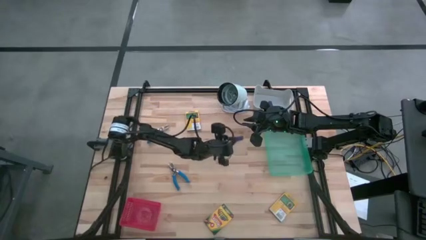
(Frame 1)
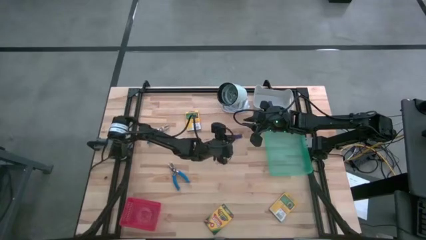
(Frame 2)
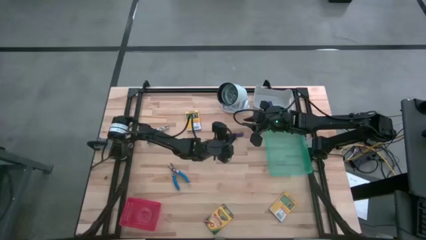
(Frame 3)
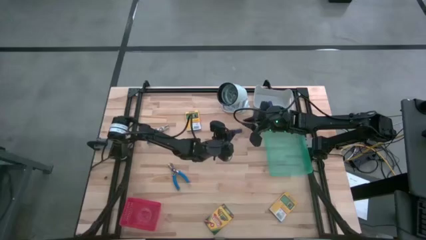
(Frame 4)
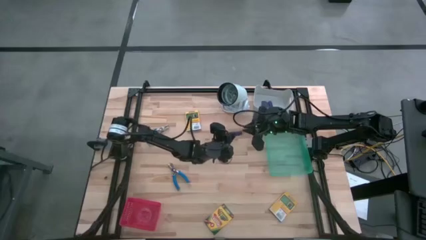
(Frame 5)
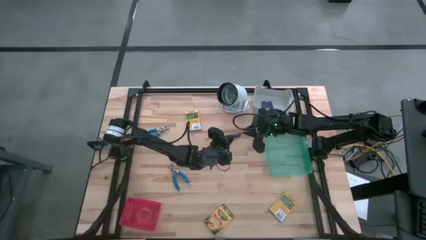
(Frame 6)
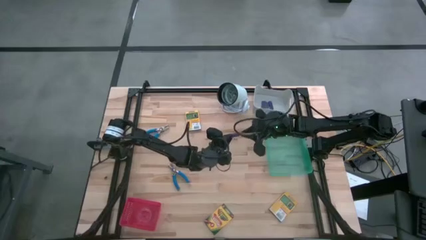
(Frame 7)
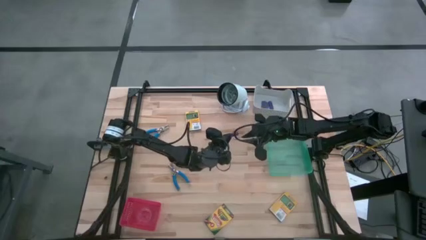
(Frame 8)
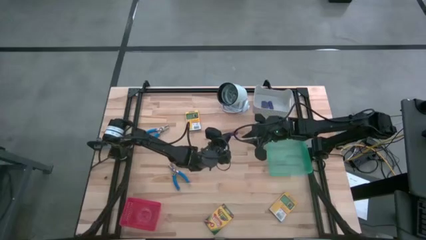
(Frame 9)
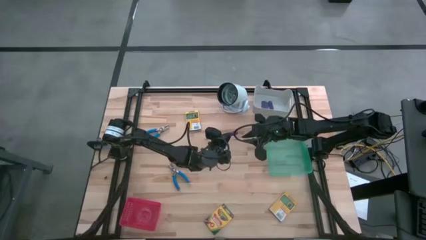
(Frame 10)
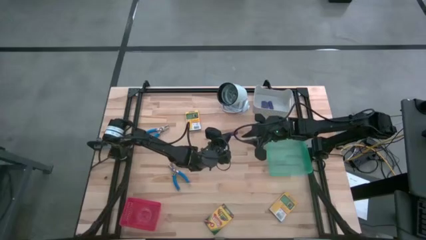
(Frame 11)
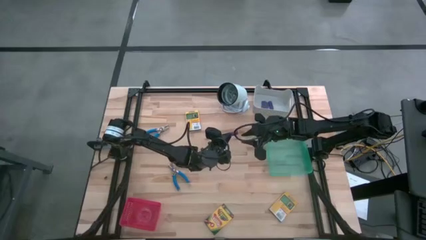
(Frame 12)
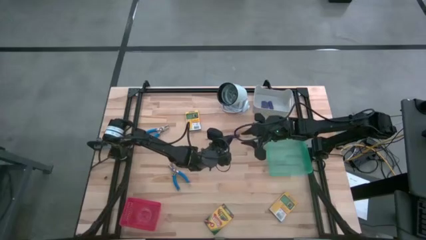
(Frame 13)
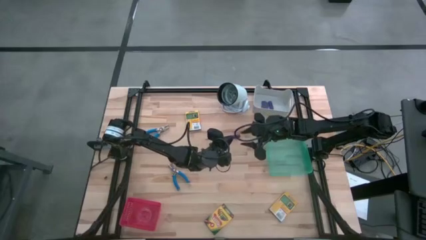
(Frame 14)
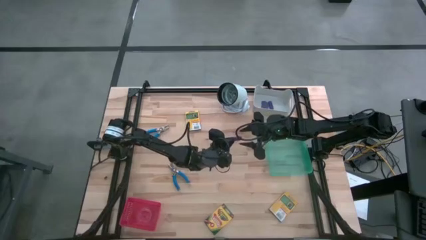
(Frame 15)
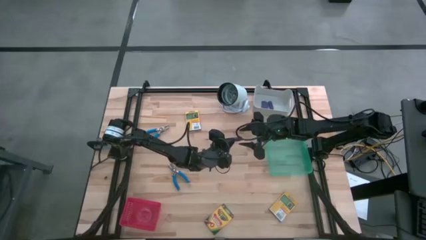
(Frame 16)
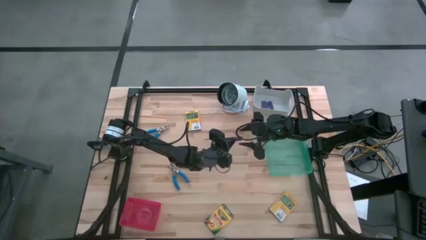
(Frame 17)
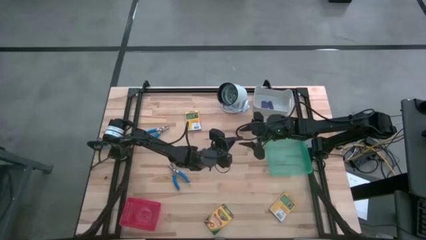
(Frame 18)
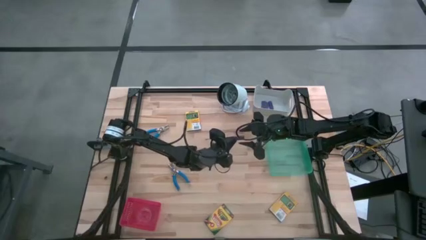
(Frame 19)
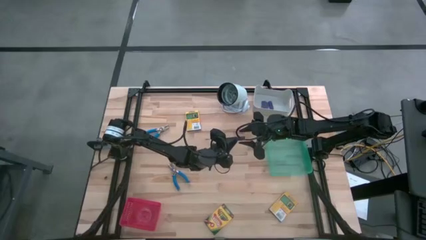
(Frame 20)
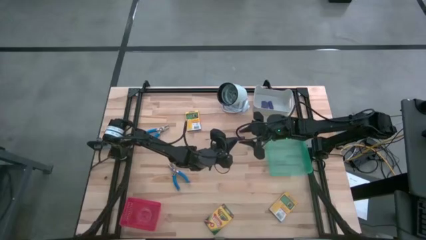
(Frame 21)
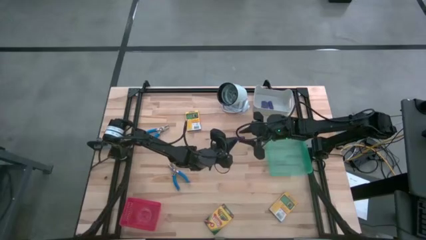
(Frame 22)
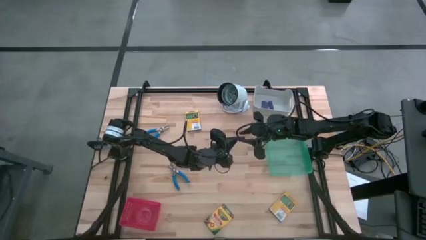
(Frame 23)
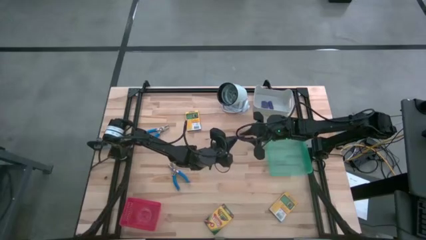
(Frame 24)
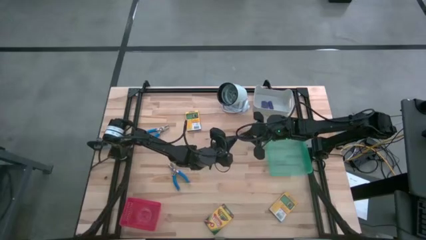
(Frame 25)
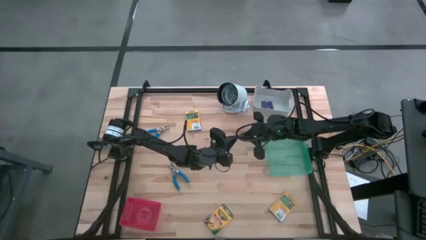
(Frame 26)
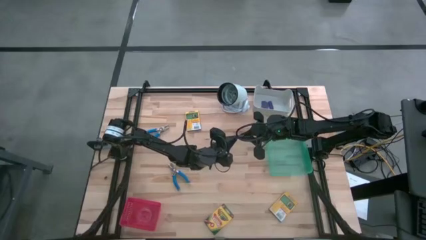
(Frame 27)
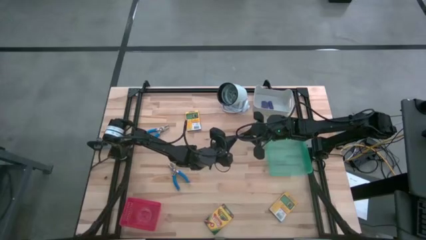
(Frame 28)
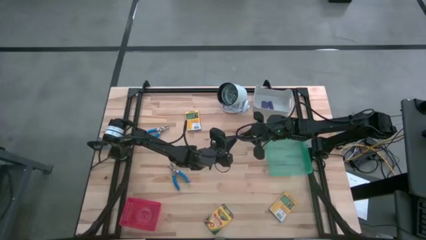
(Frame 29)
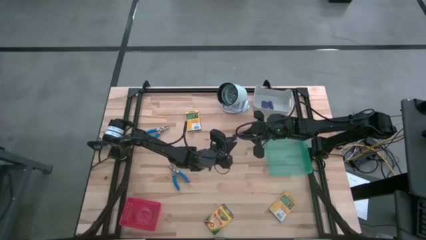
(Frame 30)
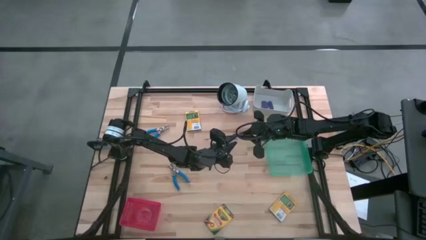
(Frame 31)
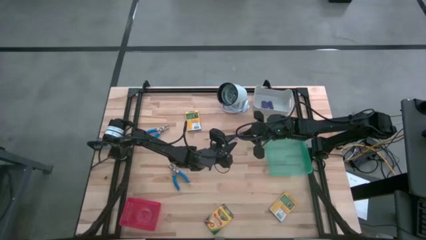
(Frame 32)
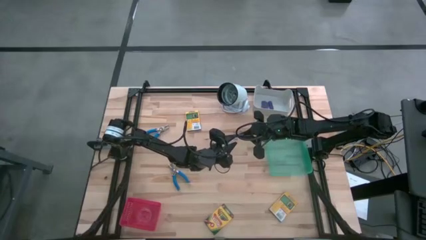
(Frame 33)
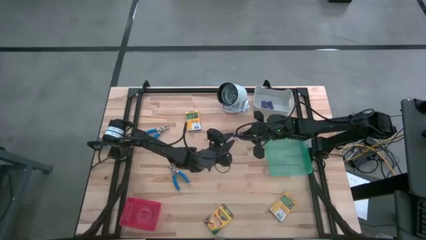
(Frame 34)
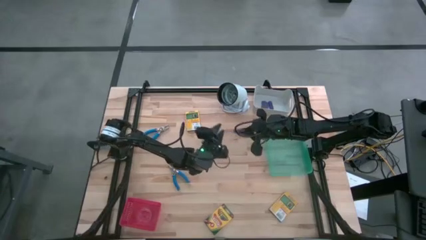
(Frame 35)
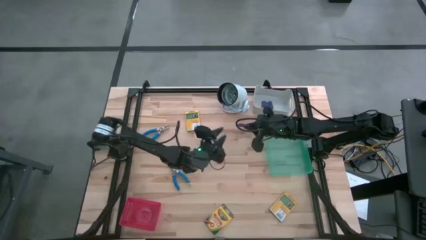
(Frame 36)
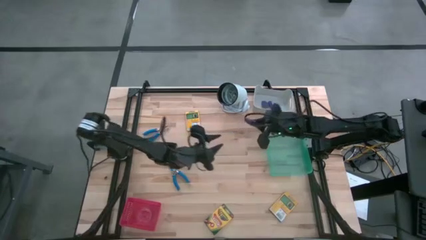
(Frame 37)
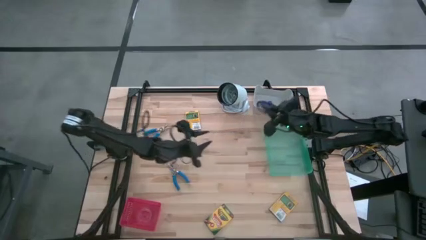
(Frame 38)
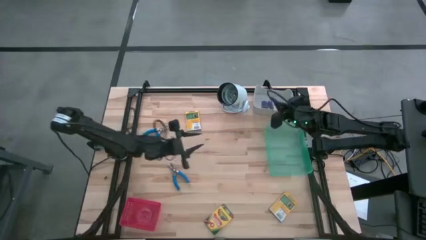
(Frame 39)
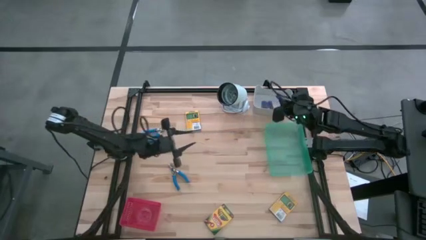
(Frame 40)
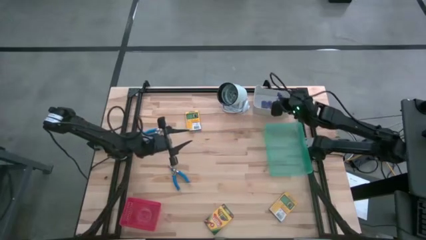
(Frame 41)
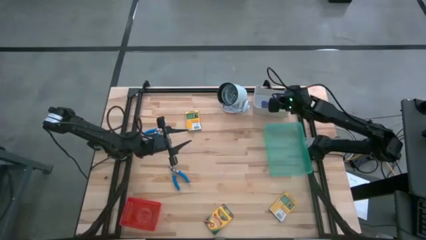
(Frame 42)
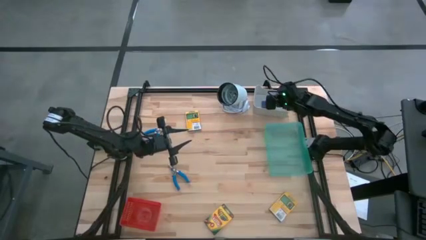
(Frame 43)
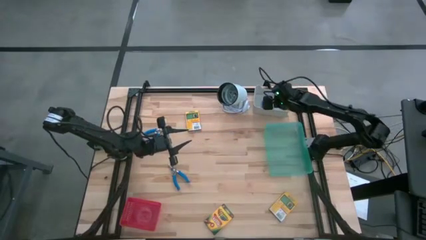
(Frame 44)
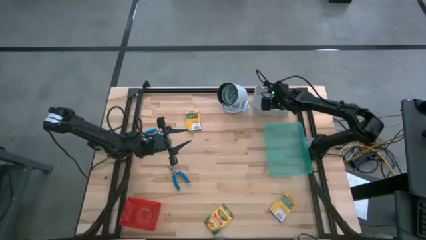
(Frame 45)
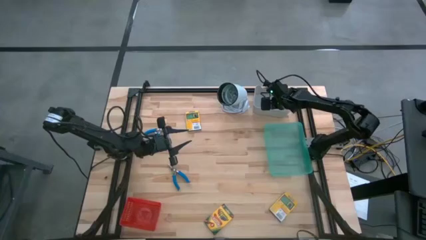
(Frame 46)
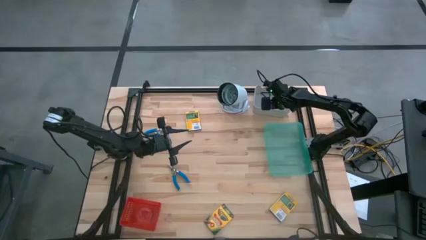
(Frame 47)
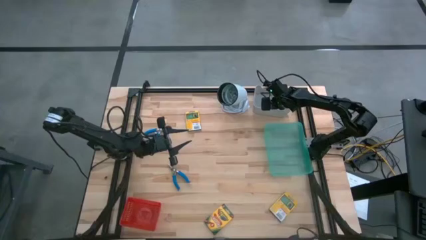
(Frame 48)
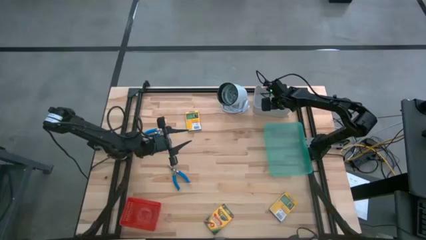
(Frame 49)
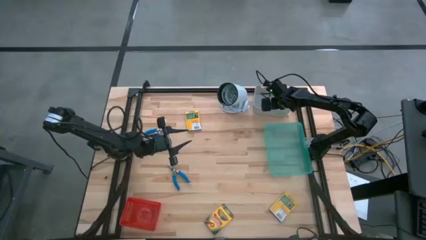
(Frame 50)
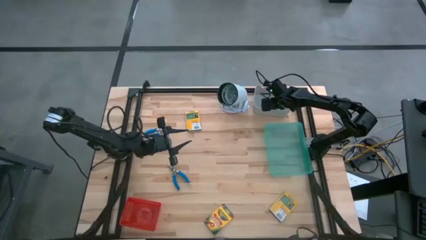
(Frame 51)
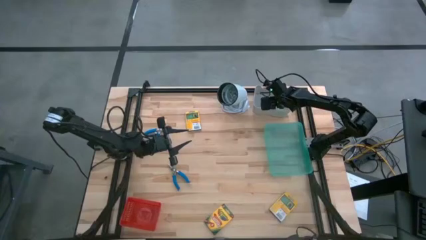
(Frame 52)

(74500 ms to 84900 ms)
Task: Pick & Place School Supplies
Put the blue eraser into the gray bin

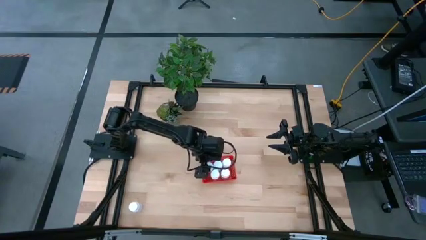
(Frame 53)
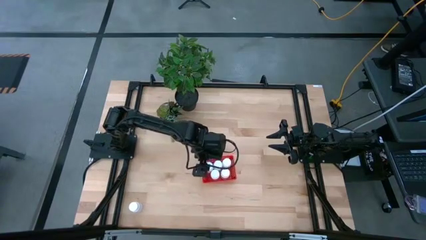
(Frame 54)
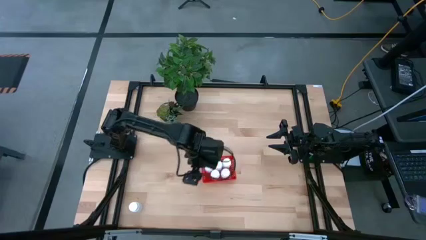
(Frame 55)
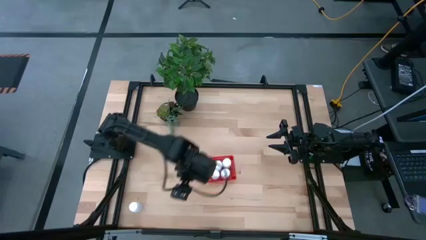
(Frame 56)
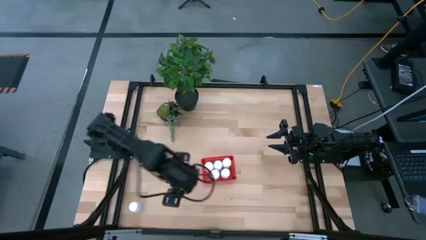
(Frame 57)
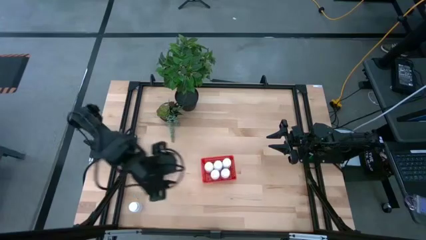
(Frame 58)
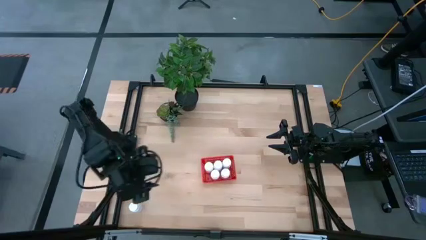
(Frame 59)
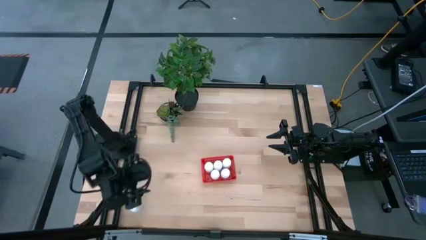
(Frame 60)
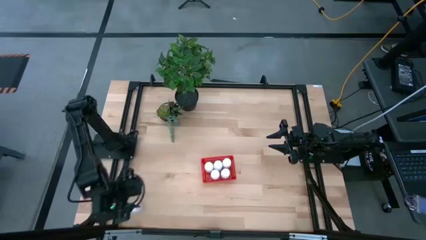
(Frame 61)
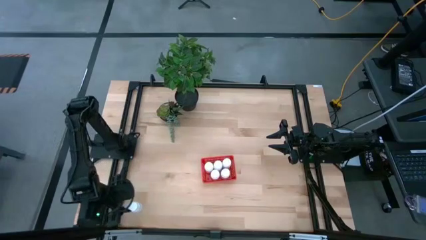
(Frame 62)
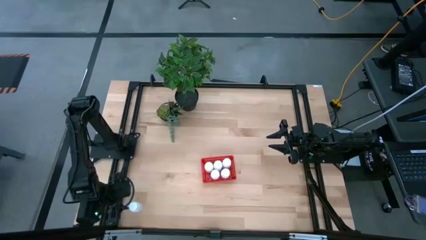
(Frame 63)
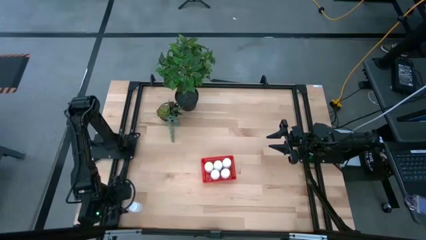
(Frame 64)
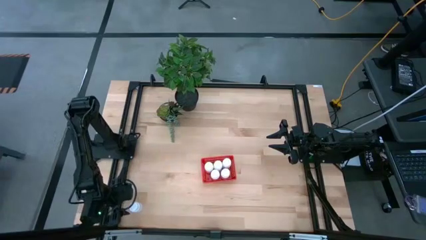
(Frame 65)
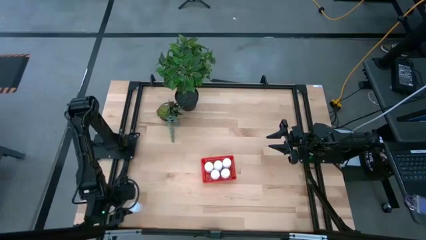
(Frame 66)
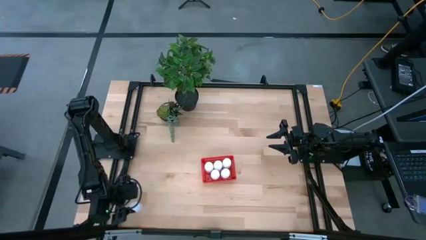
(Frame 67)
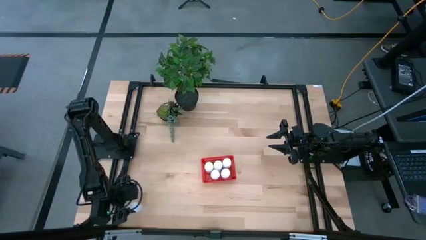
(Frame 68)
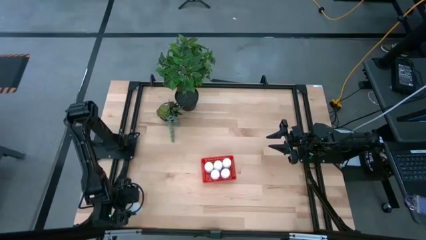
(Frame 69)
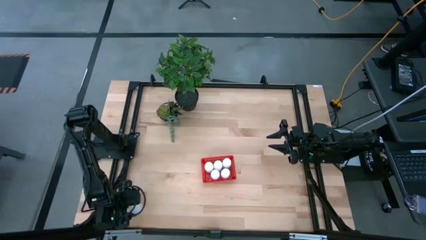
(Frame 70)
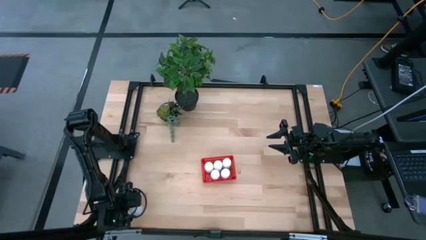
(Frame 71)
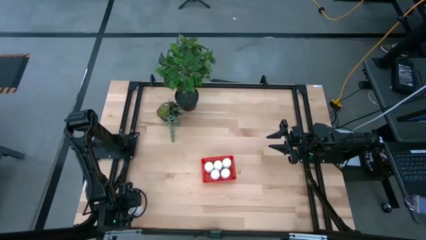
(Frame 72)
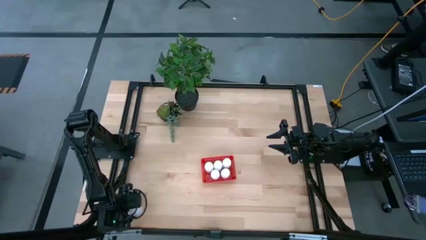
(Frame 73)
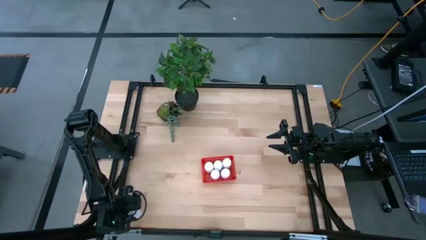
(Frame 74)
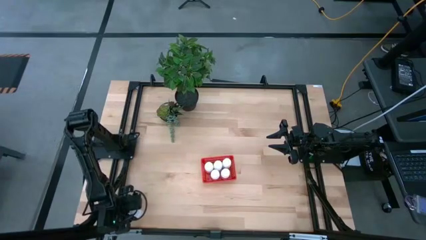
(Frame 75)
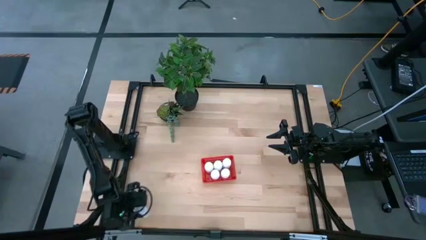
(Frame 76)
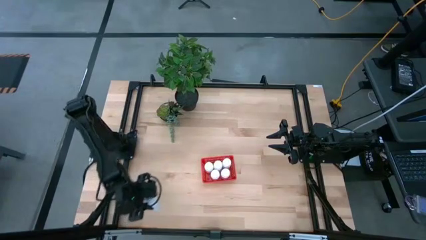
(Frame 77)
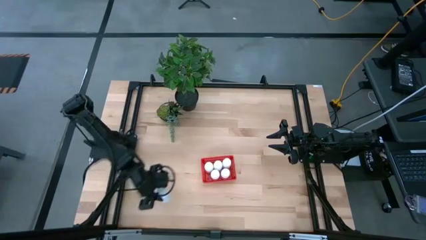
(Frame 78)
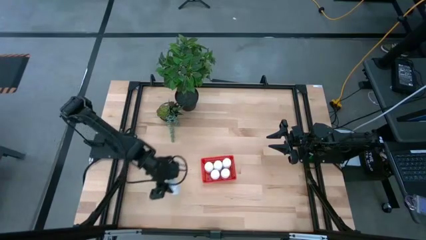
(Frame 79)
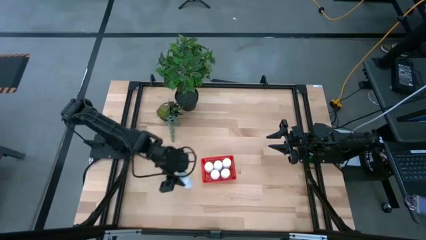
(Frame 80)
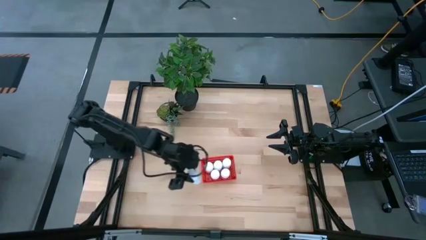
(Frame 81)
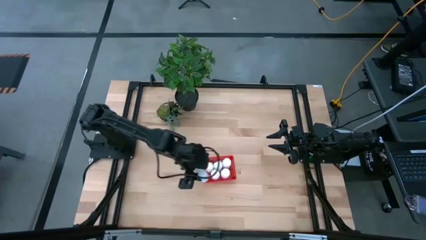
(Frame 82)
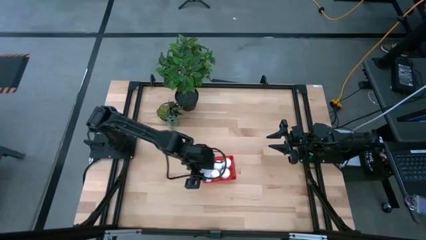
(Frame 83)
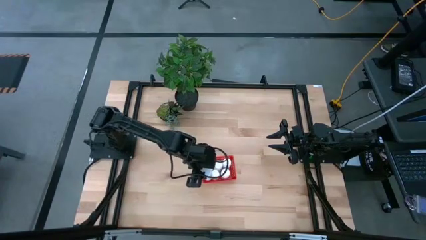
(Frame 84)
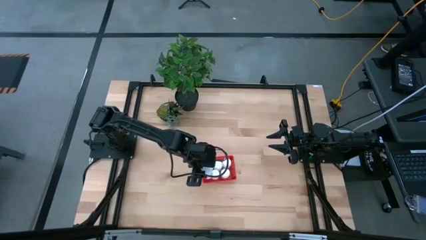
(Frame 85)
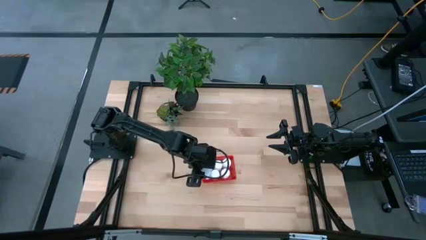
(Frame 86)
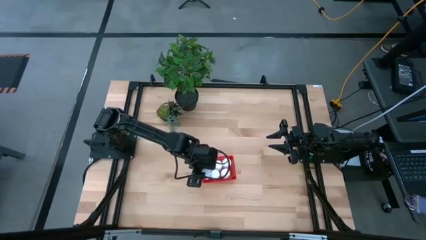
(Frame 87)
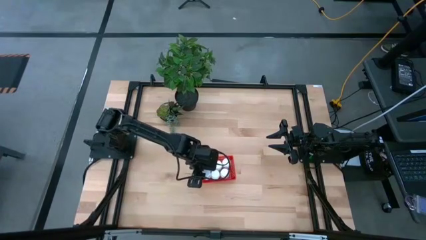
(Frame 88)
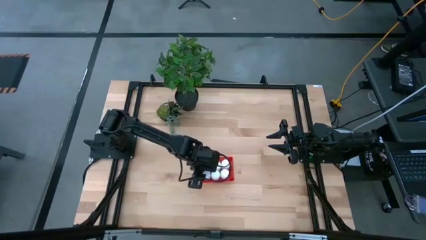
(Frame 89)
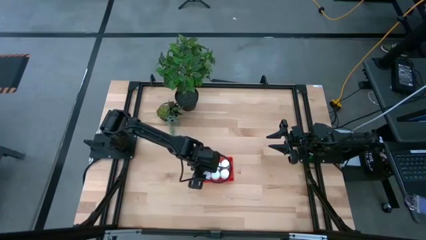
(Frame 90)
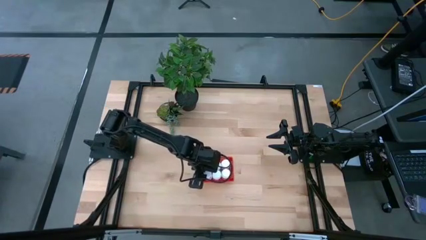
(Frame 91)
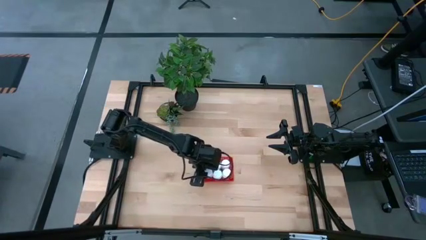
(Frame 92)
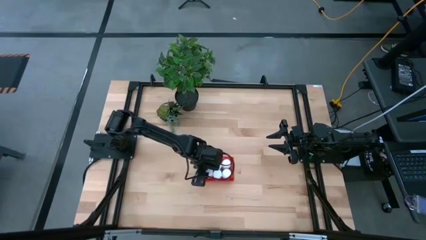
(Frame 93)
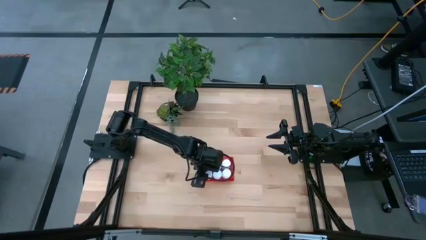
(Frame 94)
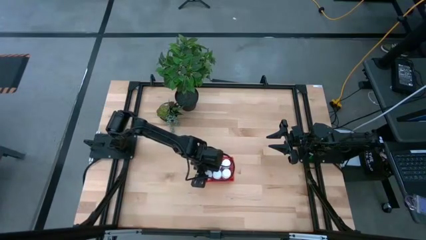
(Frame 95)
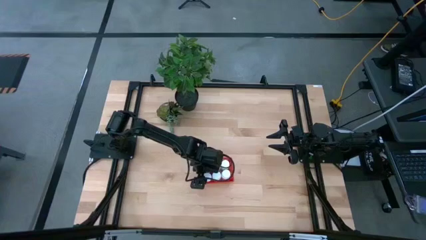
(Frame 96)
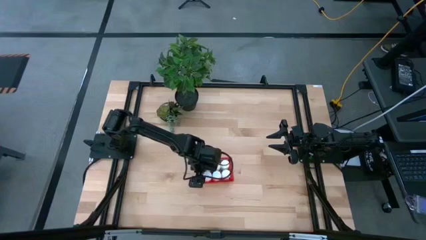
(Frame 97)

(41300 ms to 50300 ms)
Task: Pick and place pill bottles into a basket
Put the white pill bottles into the red bin
